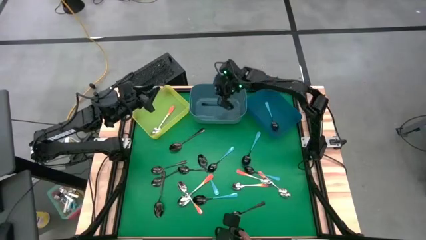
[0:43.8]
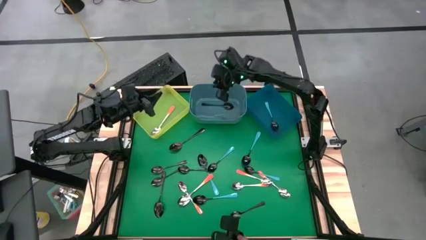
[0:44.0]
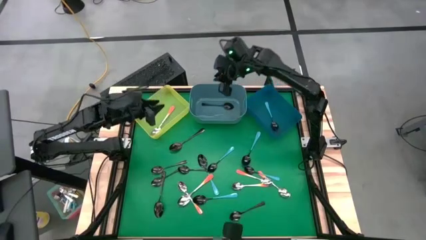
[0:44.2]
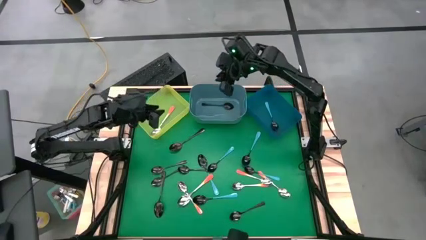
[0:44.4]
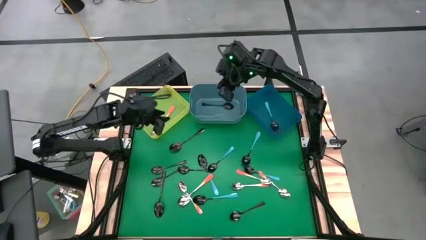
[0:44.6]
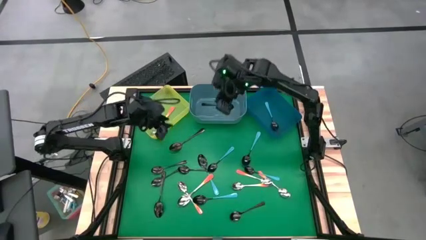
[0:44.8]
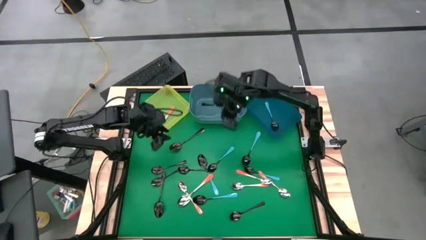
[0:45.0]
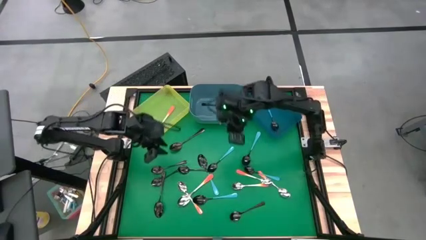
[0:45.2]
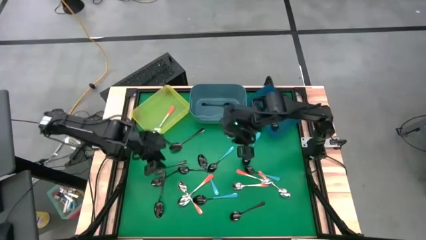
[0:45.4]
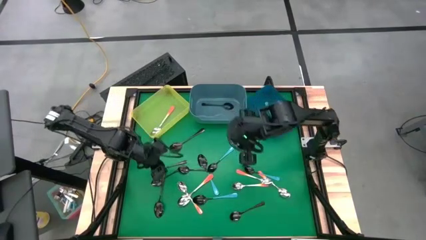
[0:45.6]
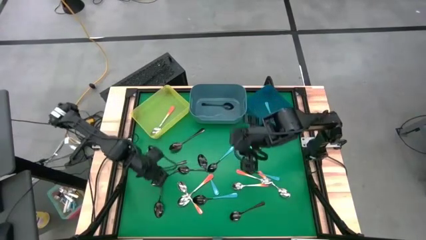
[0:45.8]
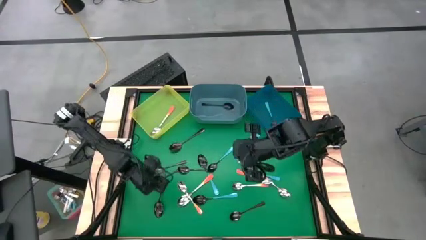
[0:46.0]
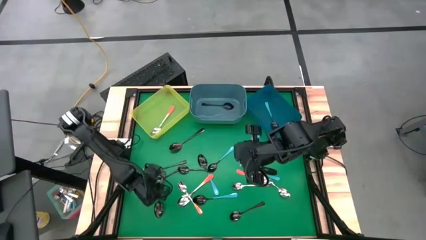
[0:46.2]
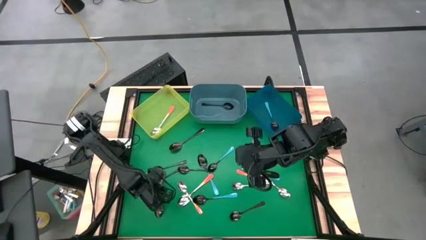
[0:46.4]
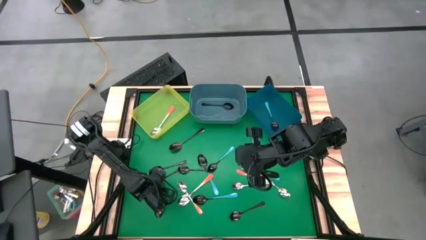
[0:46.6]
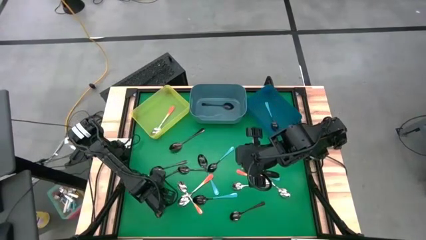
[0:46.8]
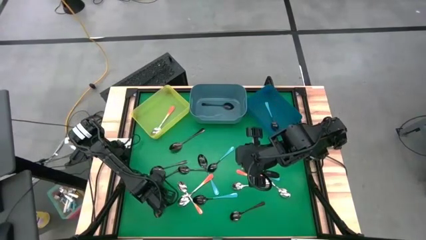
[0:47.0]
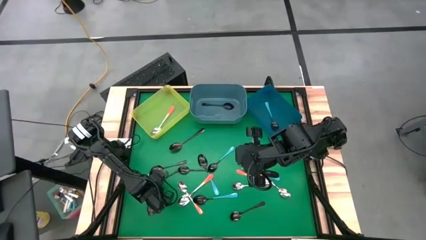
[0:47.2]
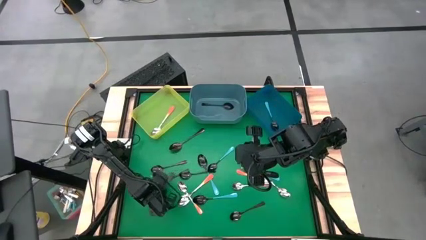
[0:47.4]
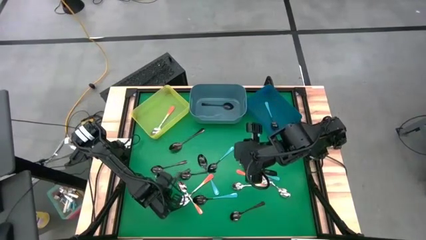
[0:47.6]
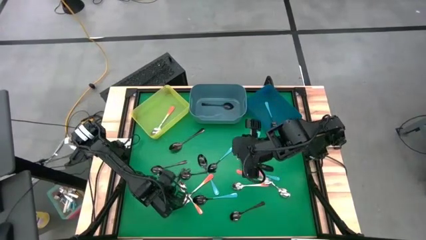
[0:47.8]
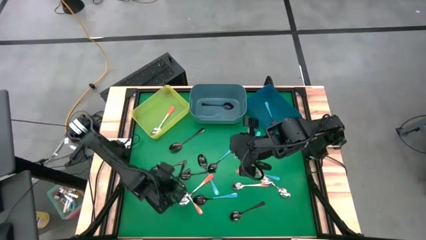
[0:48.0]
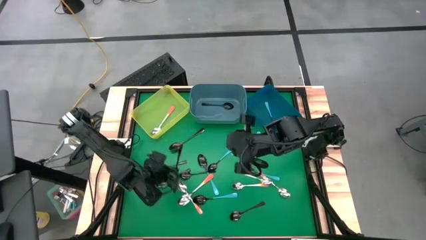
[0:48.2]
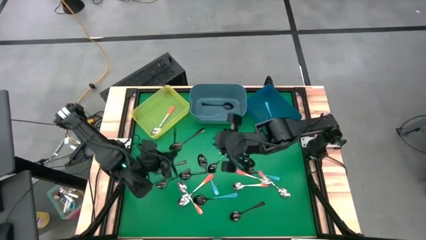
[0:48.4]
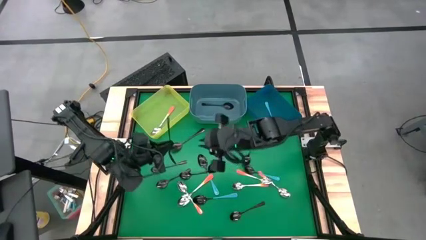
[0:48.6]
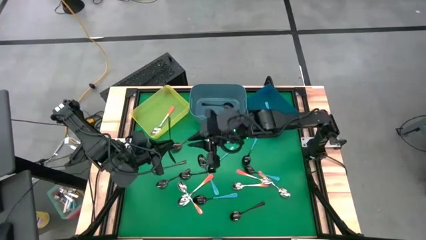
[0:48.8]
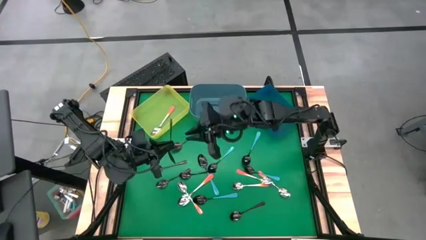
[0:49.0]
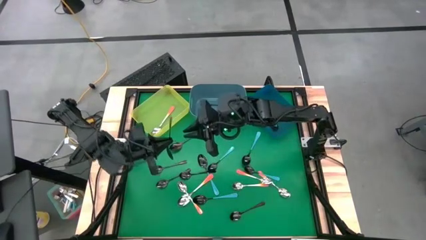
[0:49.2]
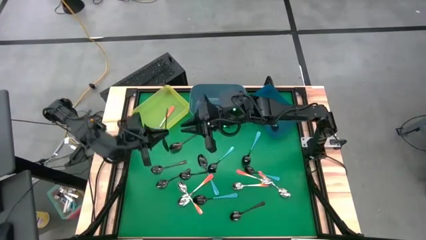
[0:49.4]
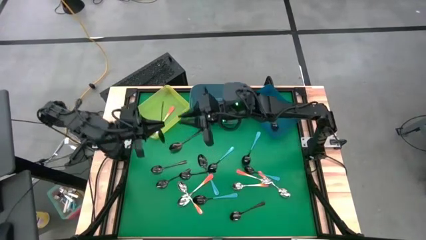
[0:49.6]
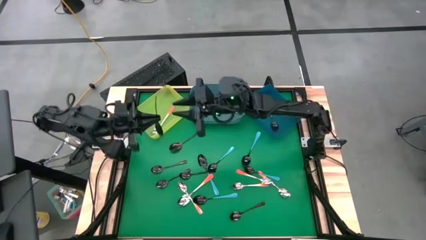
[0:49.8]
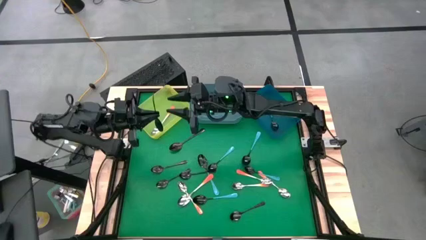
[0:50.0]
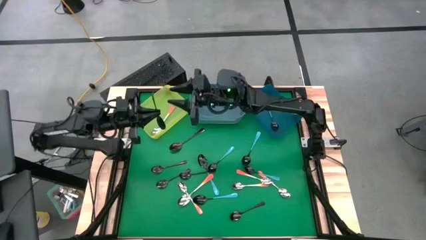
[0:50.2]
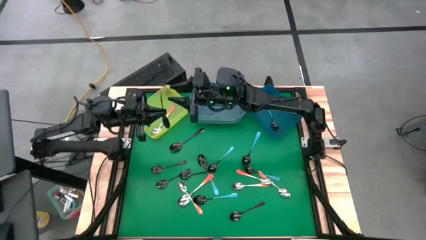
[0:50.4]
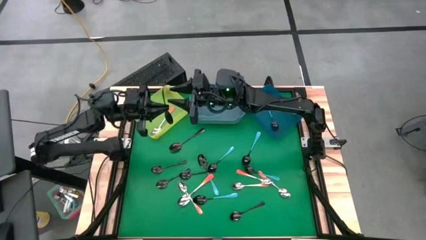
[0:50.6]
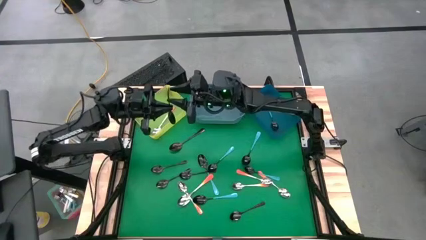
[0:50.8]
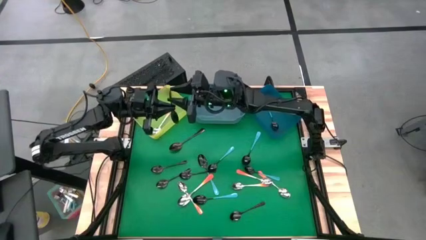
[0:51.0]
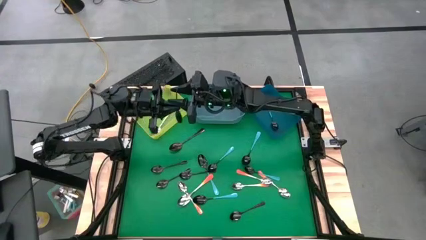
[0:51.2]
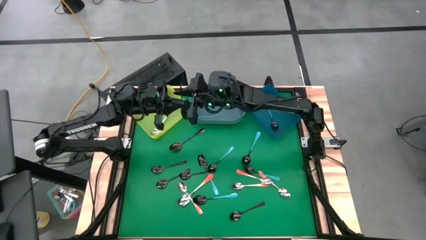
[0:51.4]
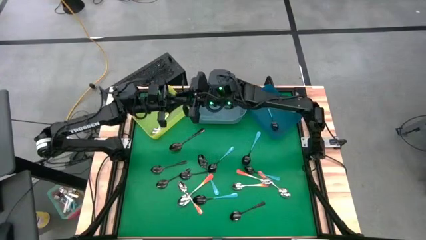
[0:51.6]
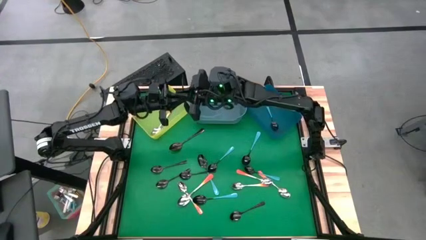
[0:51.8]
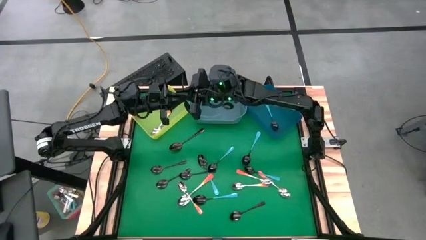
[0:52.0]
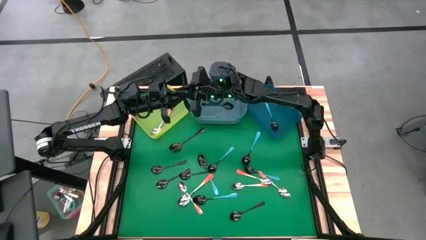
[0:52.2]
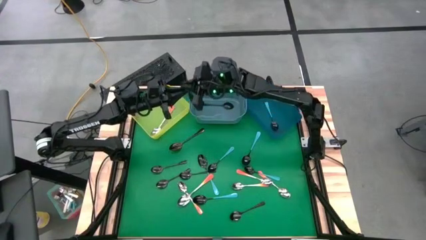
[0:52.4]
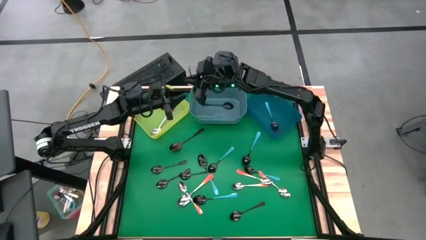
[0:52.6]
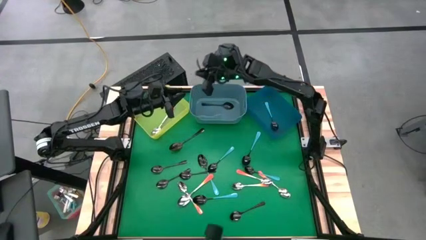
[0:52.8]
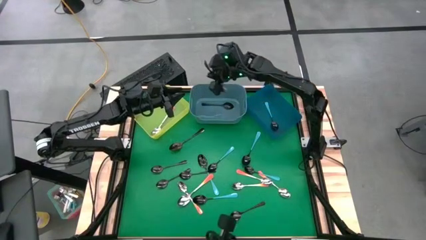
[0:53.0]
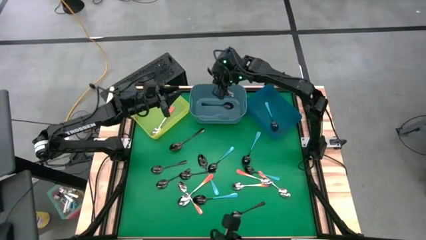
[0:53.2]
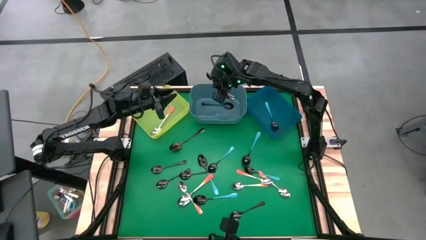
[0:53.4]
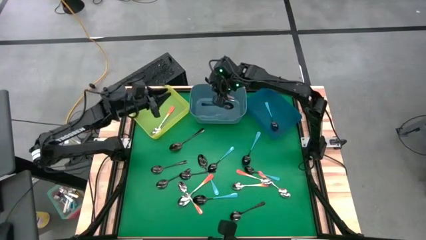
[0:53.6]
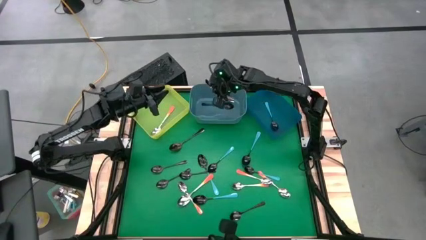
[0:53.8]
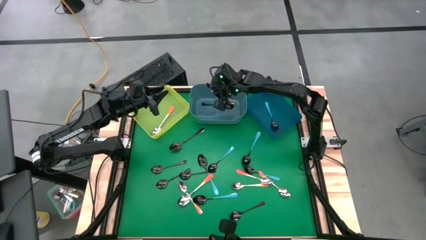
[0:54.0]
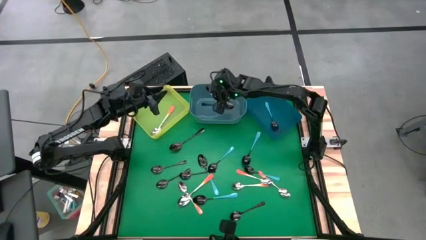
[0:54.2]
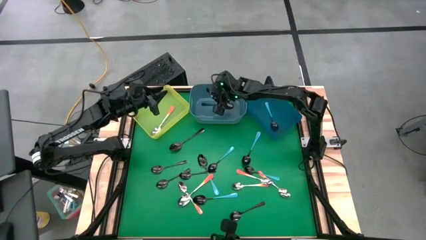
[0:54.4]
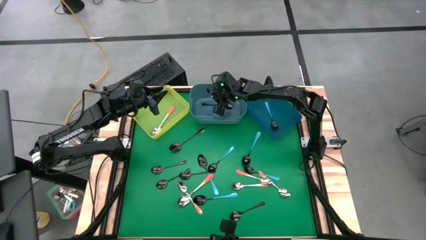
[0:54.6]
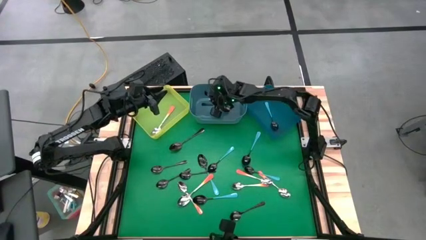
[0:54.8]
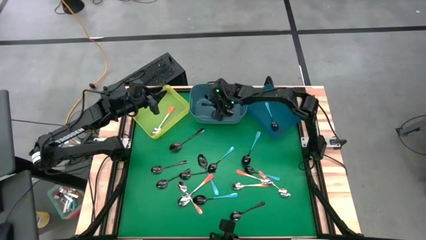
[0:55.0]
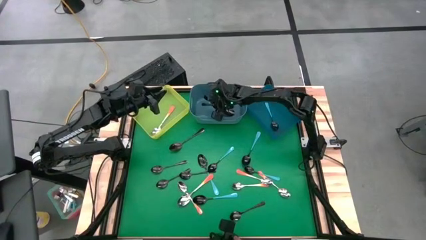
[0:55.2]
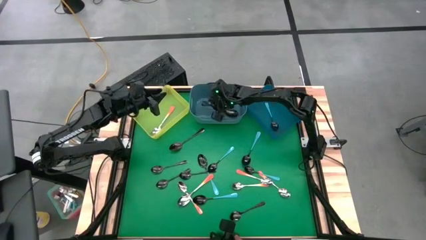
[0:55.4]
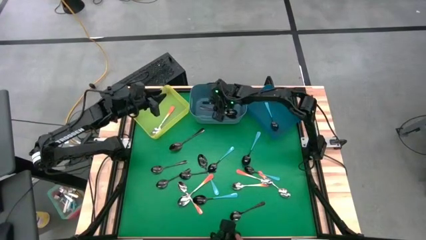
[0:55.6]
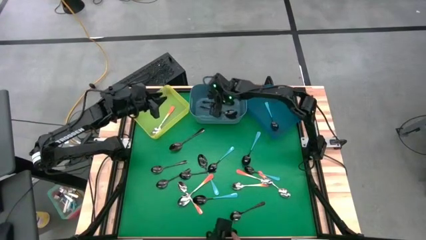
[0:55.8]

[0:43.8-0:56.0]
Task: Sort silverware by color (type)
Put the black spoon into the light blue bin
